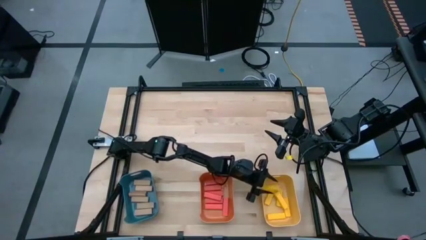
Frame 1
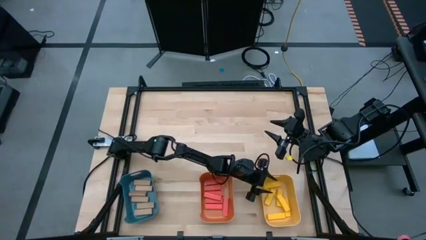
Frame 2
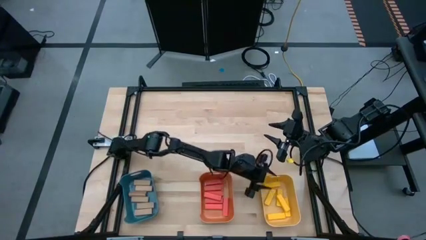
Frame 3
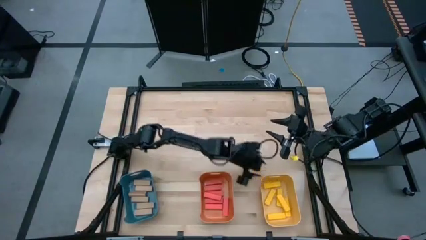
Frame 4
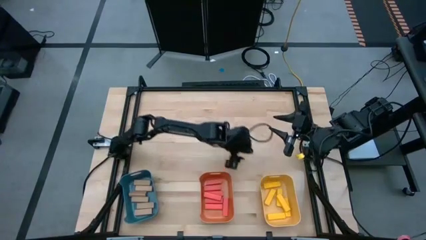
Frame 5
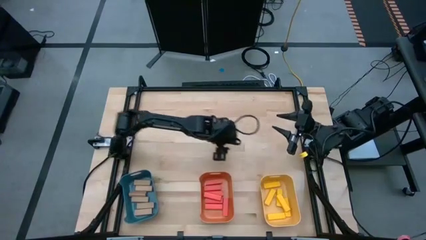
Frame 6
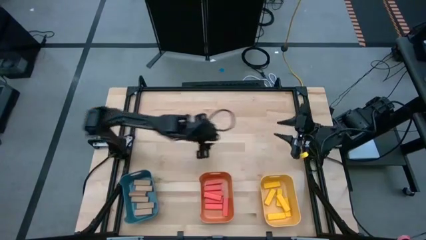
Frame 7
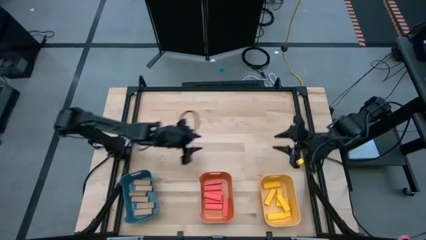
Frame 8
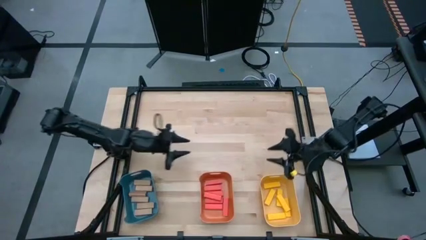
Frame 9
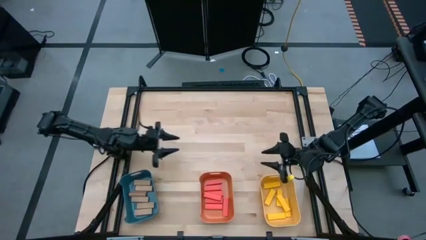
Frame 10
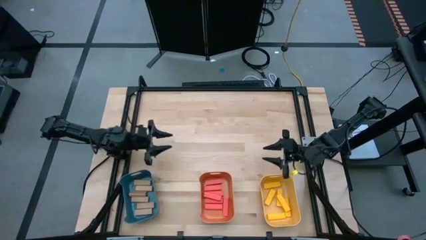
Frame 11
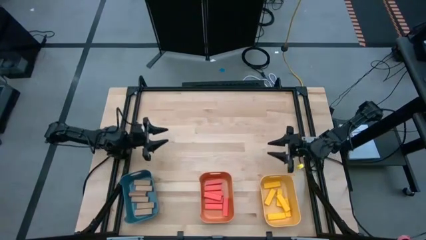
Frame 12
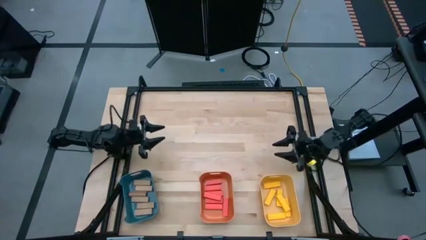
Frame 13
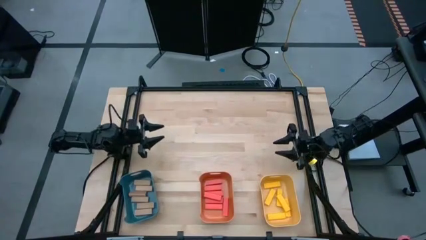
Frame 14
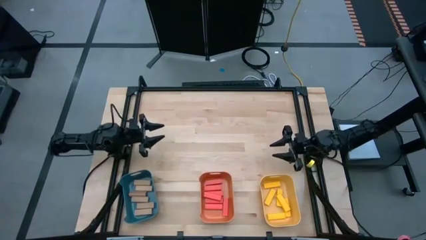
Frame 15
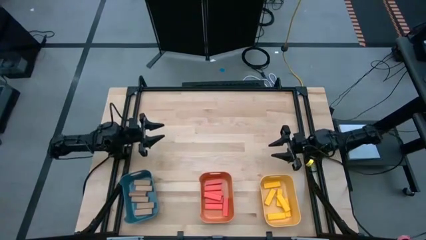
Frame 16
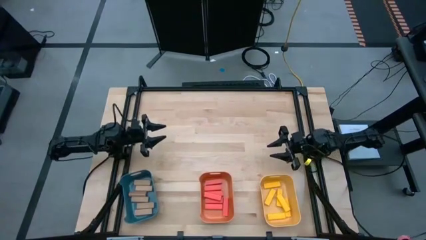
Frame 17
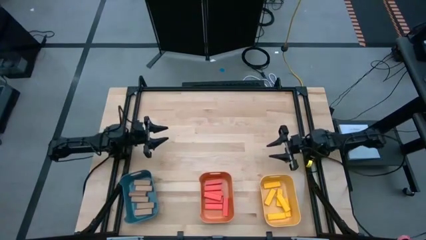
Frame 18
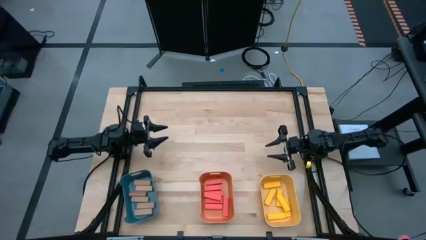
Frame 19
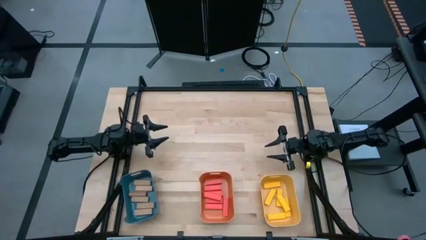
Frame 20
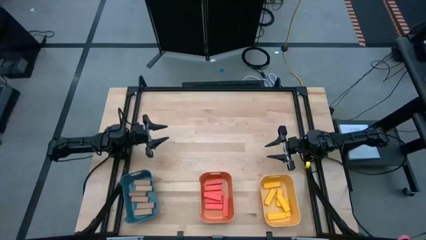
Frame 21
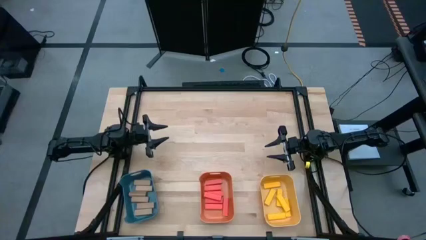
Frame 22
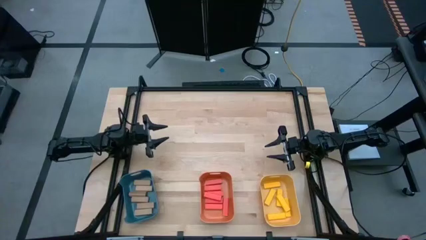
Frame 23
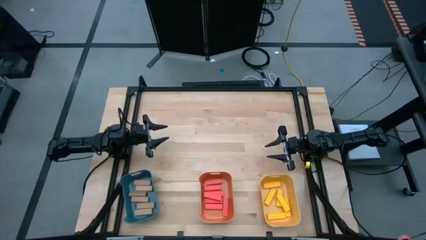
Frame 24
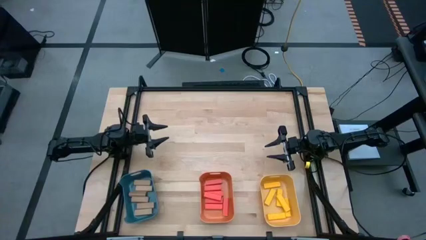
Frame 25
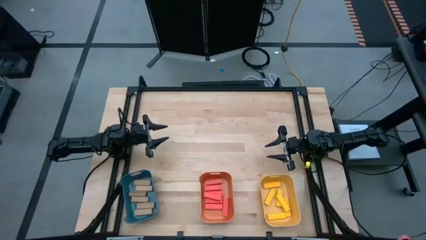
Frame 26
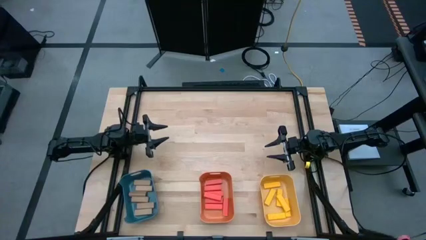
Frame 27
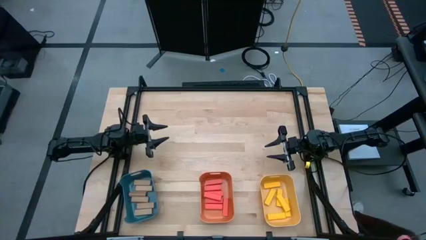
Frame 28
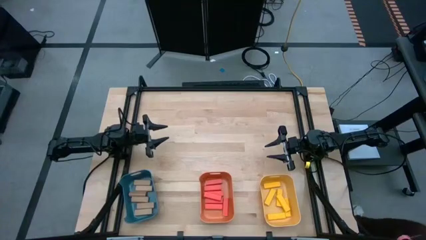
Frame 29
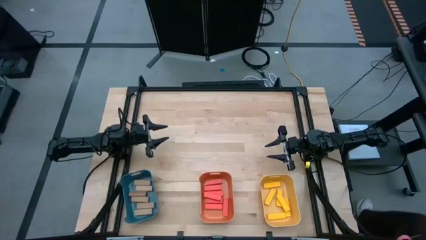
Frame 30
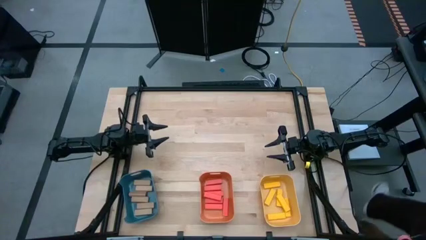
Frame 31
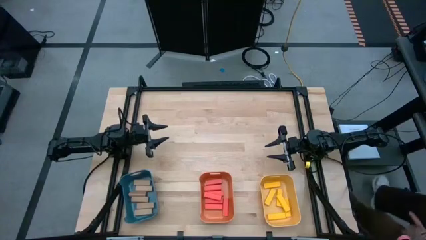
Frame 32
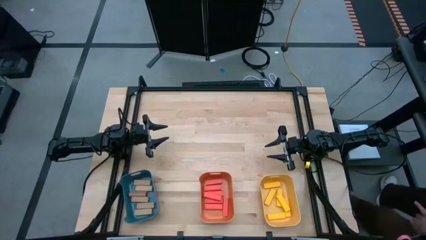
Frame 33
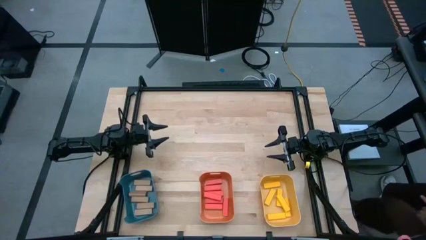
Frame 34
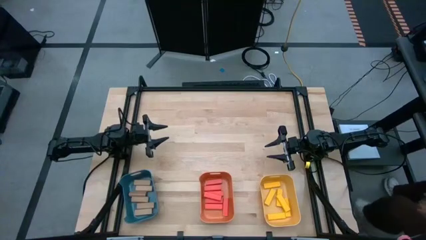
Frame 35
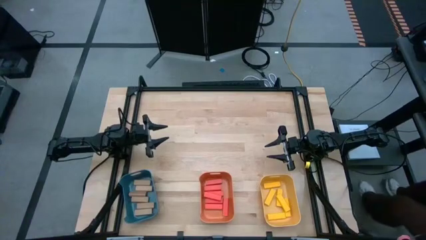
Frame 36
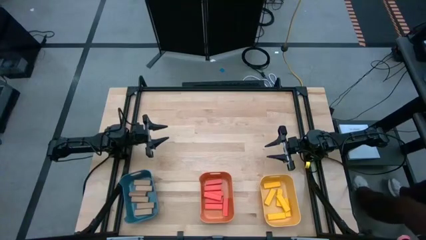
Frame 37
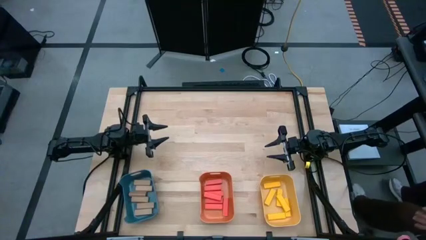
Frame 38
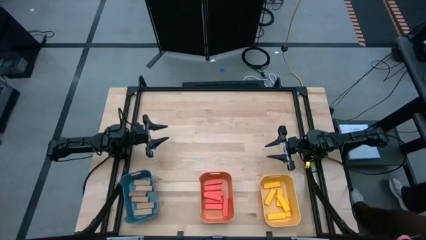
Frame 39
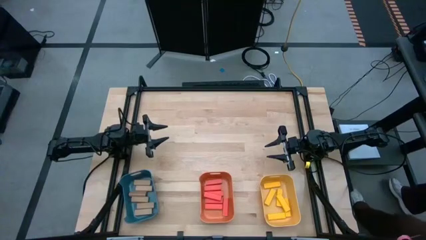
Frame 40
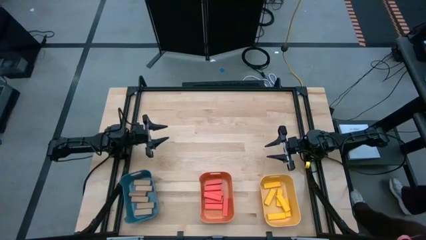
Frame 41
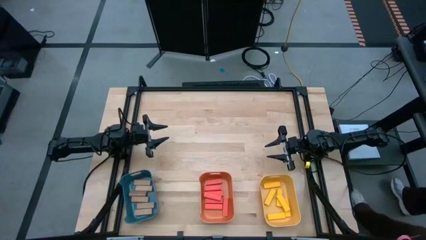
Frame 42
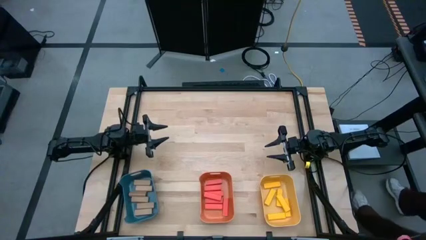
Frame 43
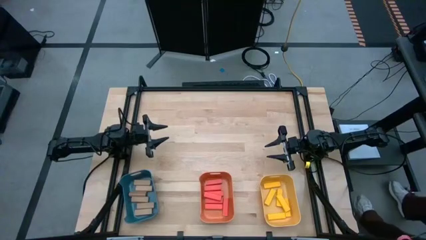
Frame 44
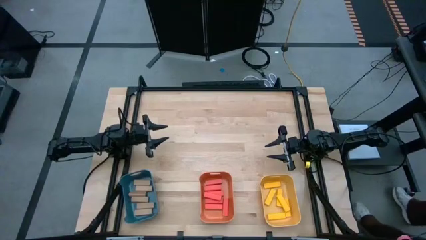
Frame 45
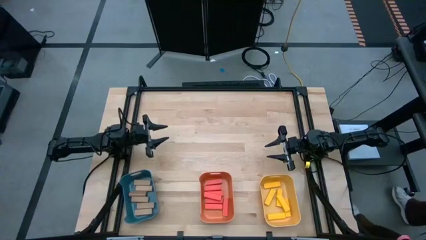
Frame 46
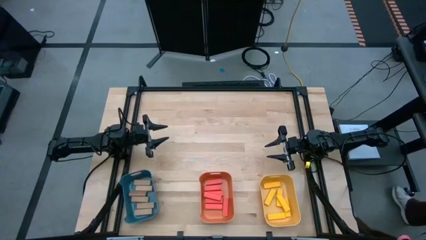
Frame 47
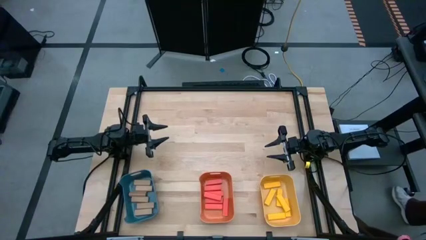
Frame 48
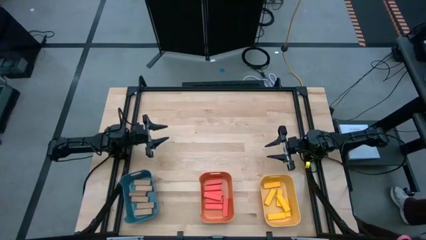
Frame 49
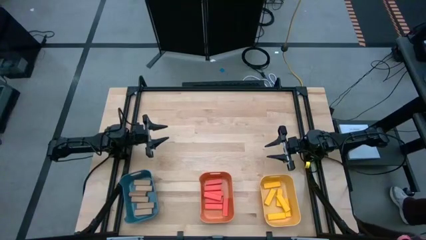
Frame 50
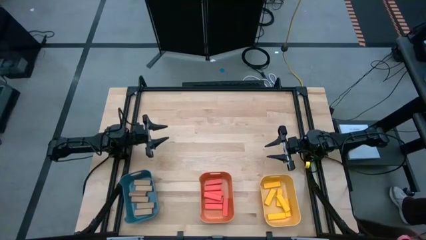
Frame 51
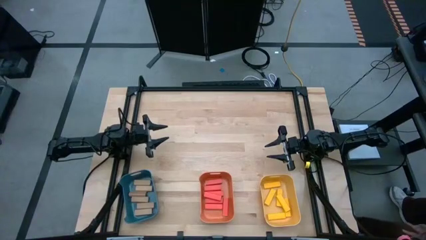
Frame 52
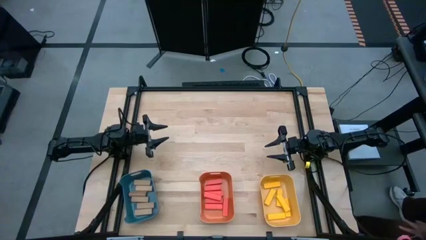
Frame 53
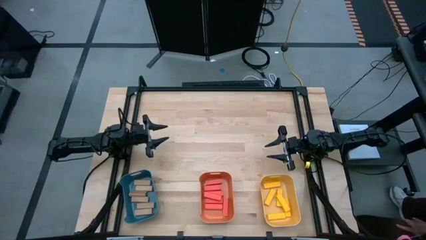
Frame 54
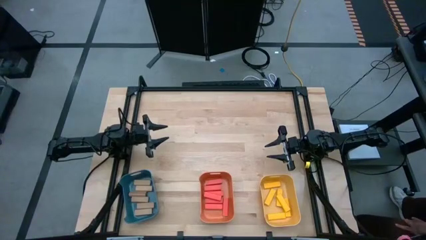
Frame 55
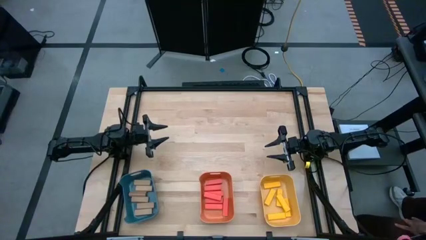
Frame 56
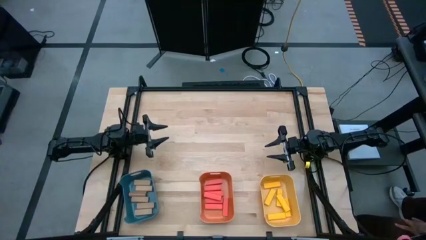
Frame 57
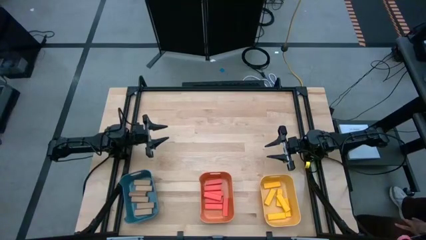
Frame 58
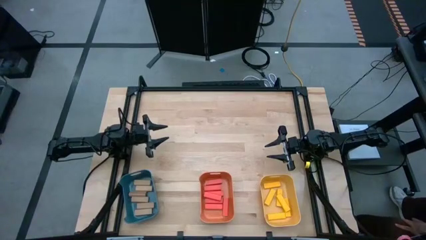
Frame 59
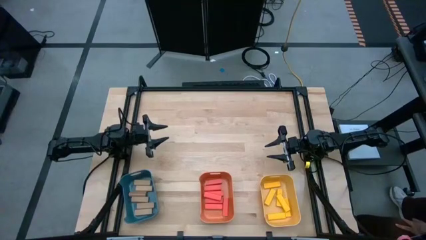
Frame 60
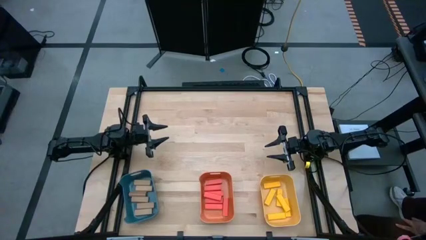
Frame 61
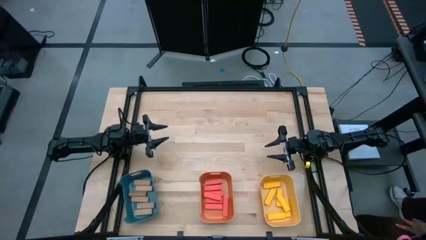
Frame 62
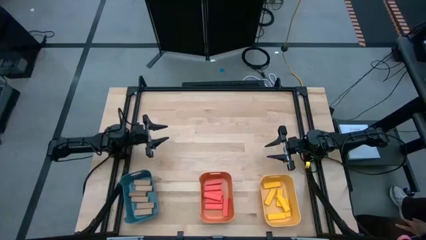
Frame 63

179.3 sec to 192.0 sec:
Task: Sort blocks
Return to Home Position
